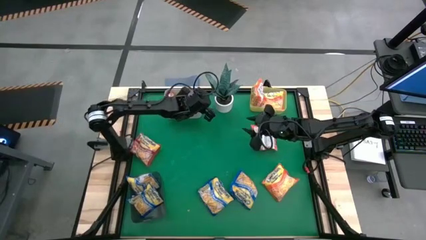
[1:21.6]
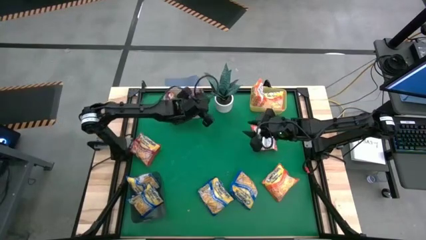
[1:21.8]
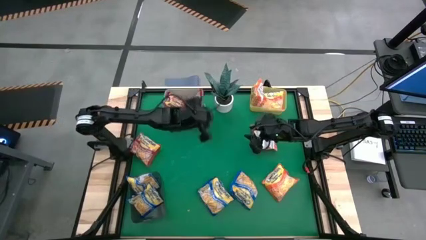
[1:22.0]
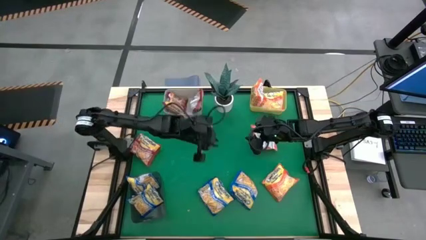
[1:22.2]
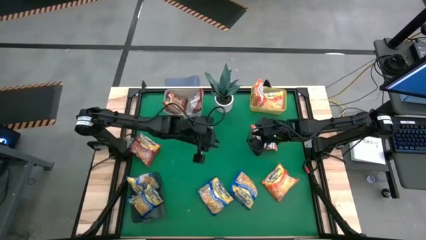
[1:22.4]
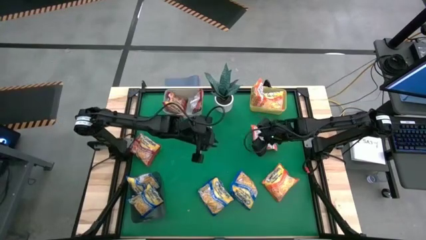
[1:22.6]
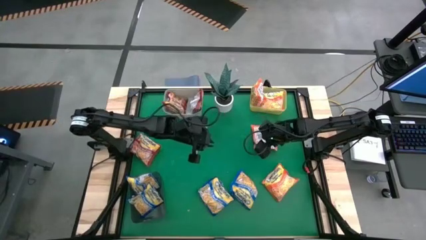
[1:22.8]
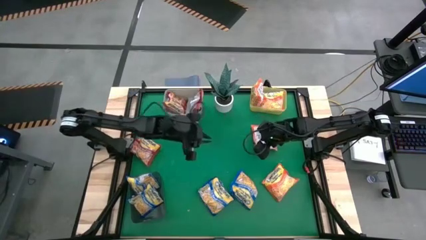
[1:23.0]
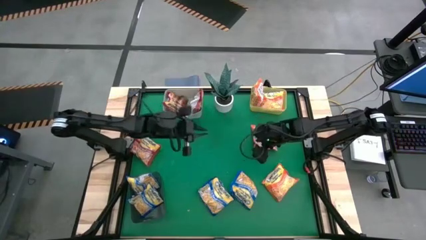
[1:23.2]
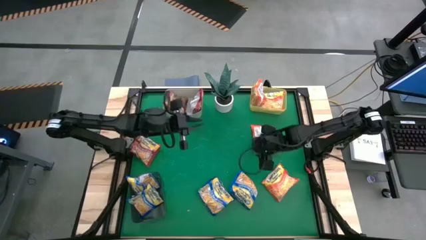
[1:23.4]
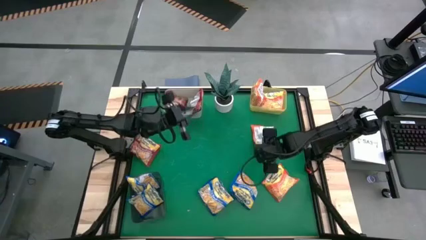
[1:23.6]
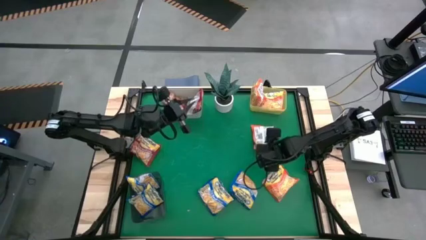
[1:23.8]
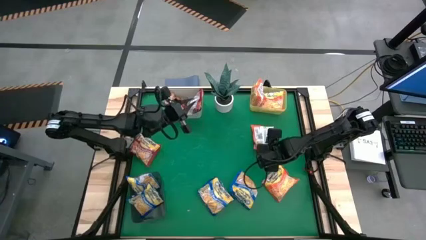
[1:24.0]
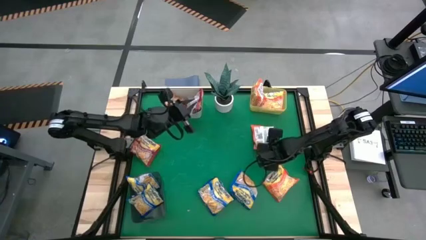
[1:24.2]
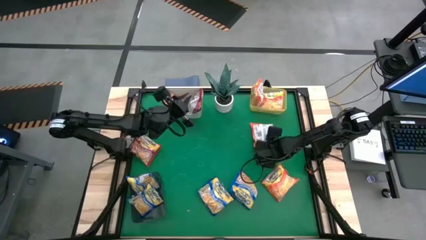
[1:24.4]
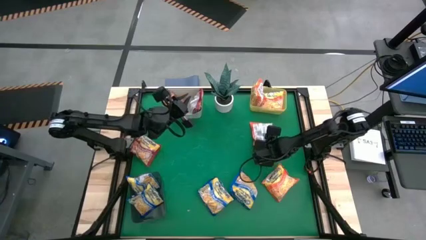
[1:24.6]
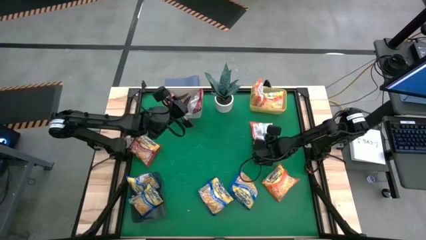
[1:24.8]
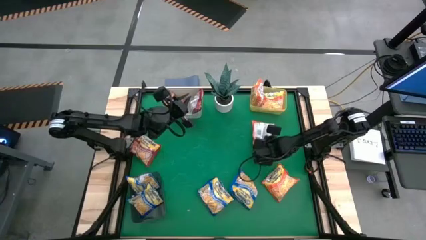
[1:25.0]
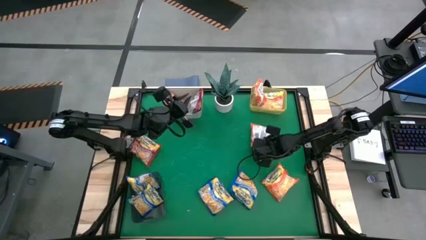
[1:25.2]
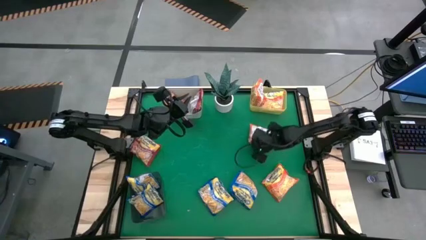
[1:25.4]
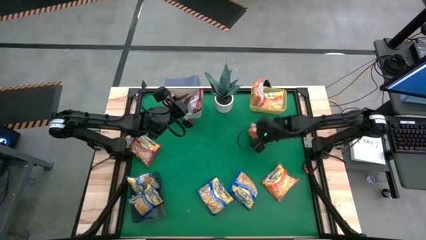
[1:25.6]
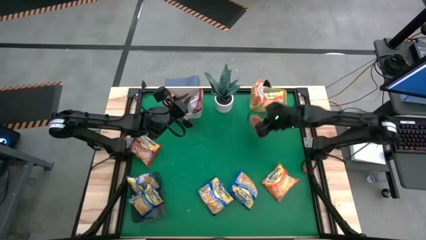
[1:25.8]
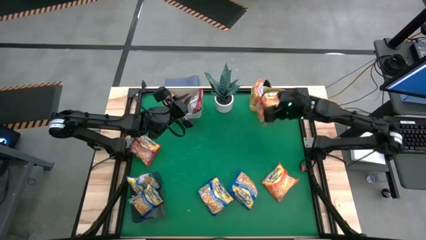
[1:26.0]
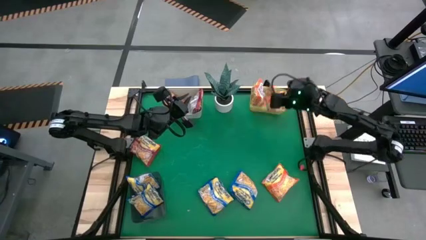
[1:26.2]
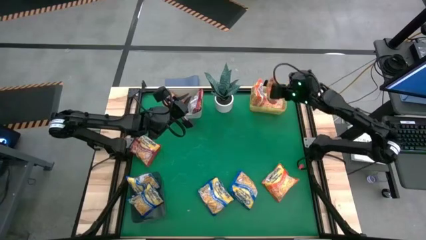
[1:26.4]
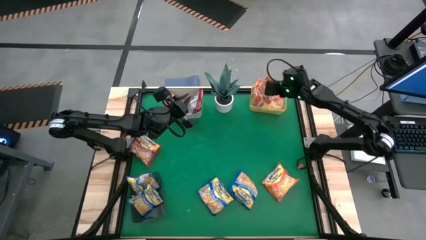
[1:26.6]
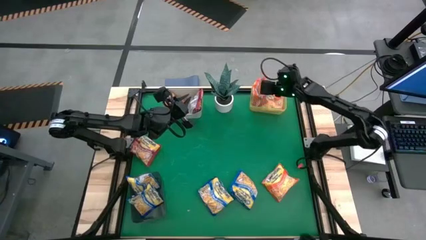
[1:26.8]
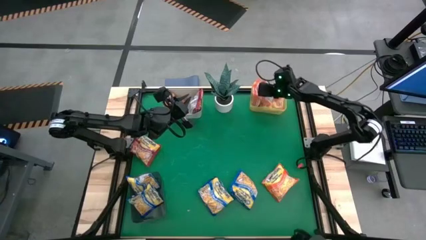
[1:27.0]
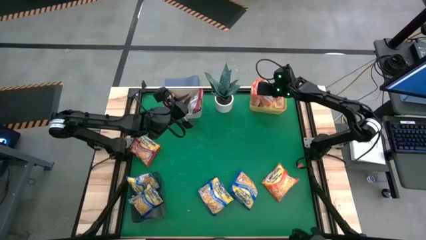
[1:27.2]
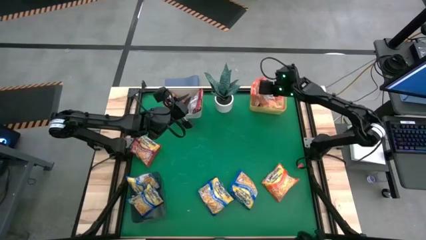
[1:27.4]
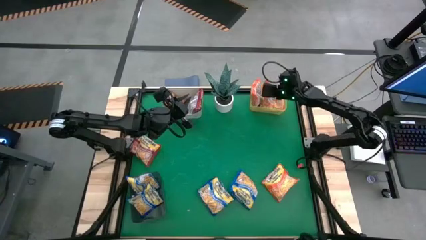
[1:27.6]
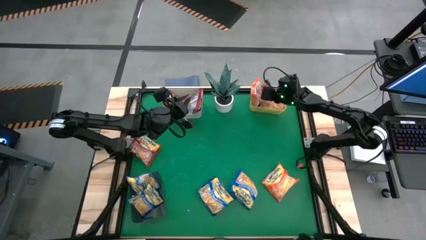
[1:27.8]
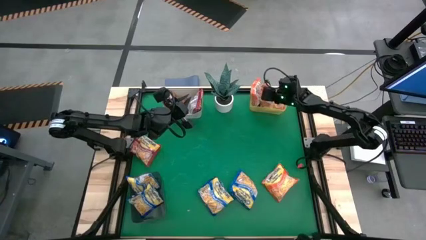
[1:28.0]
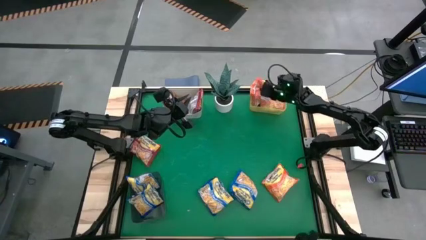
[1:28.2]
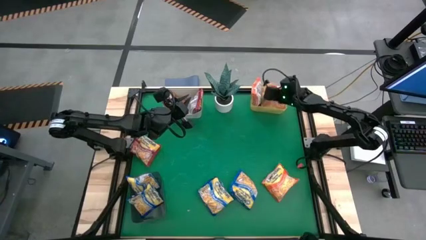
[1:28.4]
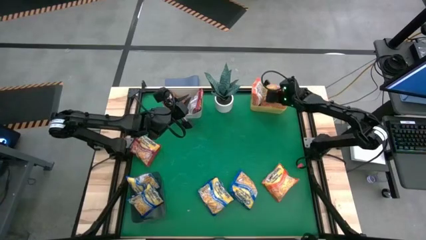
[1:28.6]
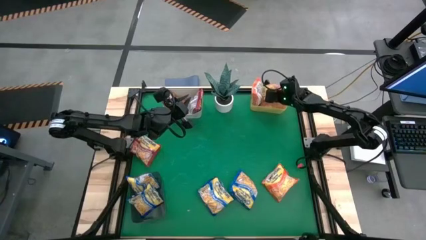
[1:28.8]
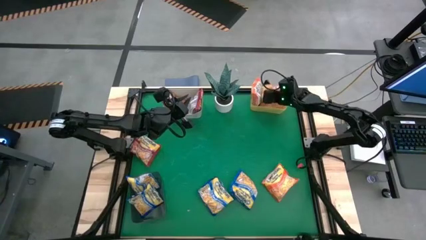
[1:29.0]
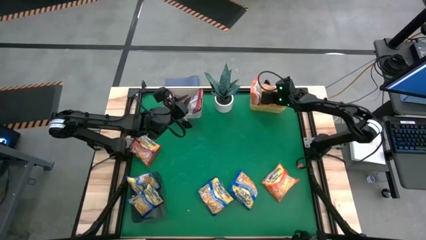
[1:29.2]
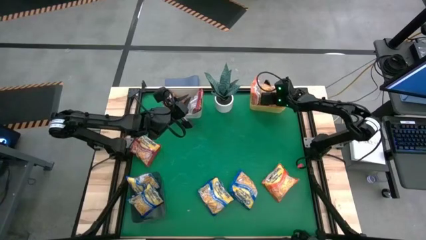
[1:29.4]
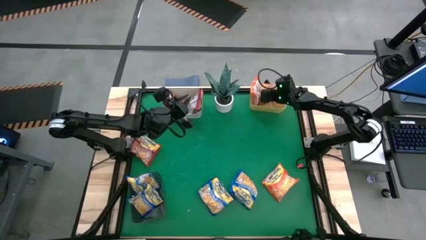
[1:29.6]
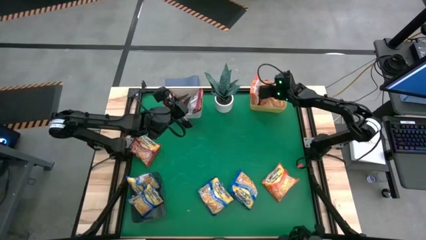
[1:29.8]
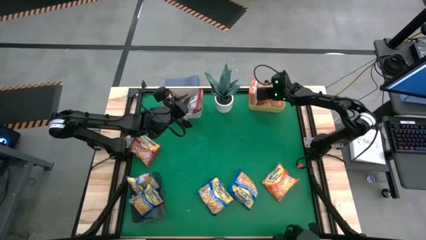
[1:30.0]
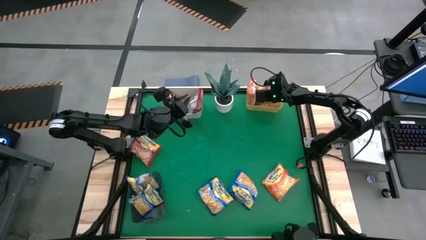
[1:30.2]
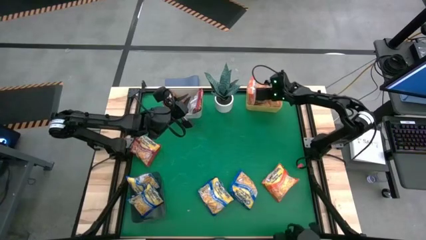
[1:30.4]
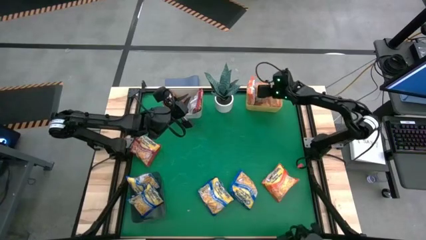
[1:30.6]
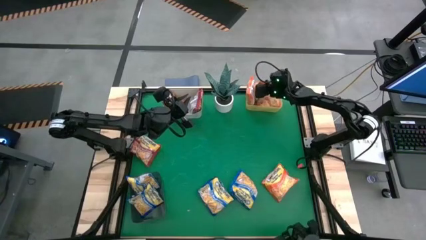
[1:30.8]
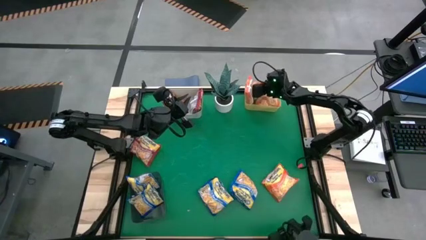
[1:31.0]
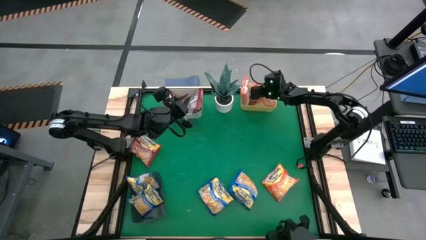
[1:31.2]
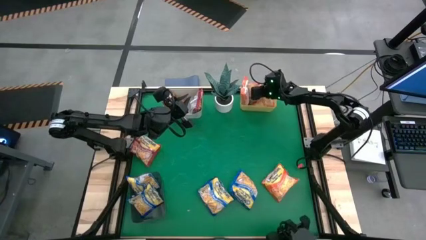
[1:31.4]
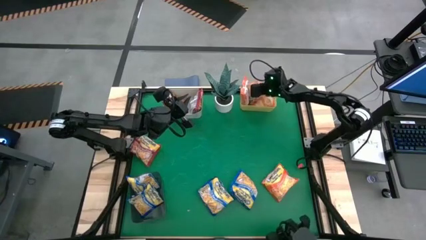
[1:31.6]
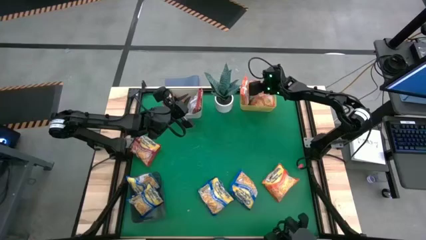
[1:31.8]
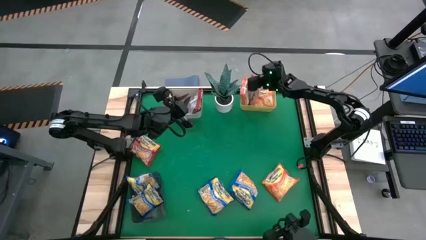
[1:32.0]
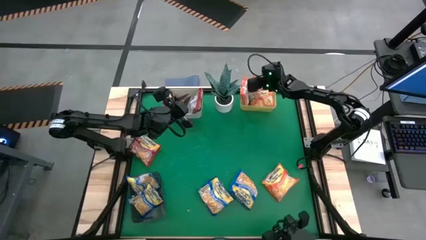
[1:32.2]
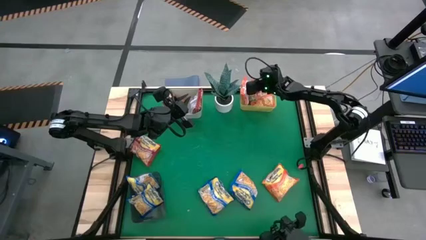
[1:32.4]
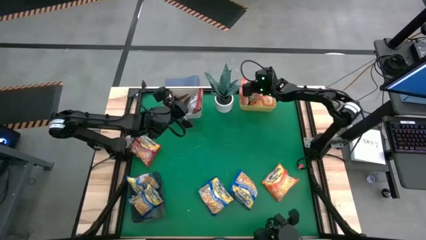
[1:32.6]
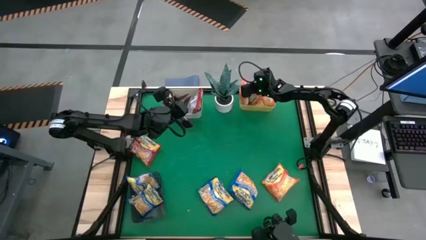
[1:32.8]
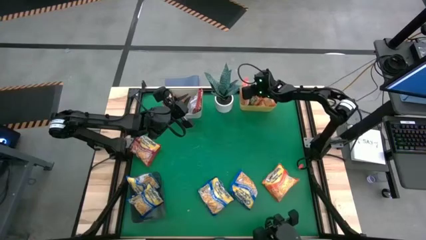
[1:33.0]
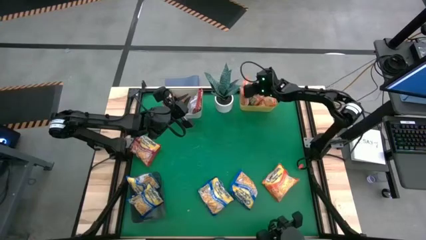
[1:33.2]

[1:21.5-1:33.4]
Task: Sort Maruchan noodles
Put the top right orange noodle pack into the yellow bin
